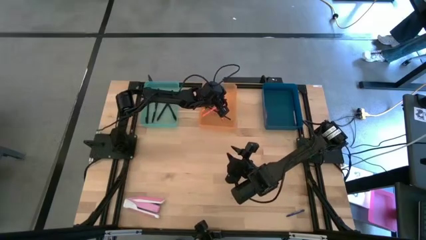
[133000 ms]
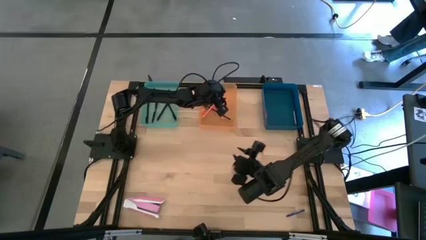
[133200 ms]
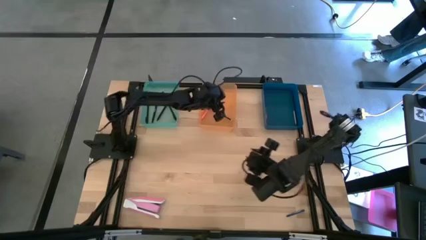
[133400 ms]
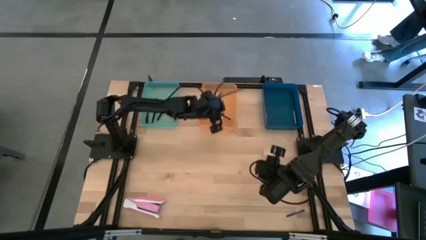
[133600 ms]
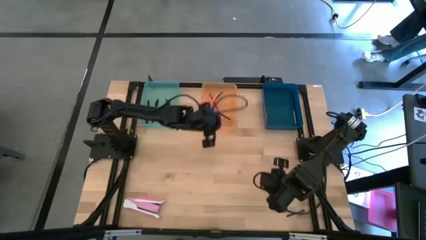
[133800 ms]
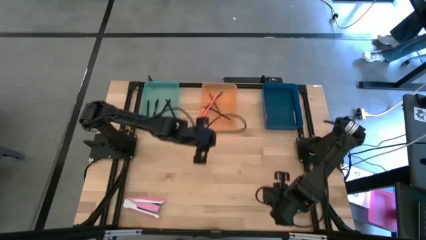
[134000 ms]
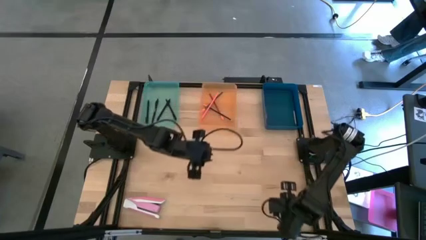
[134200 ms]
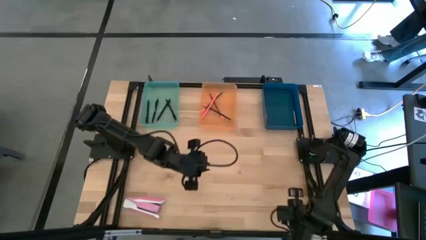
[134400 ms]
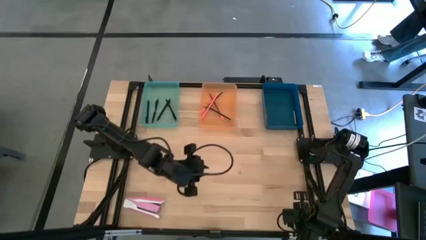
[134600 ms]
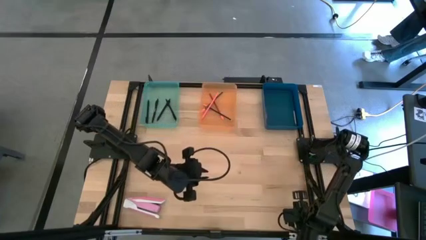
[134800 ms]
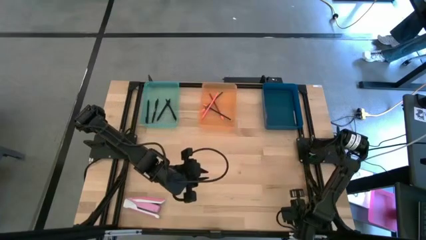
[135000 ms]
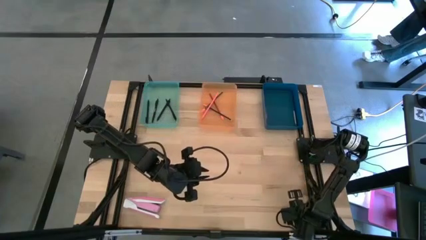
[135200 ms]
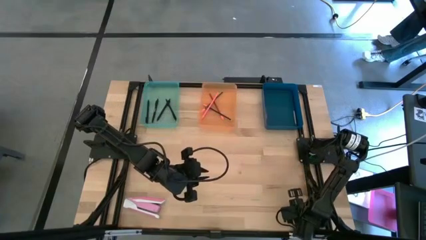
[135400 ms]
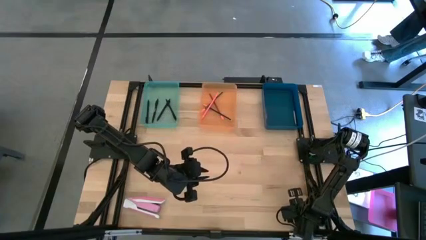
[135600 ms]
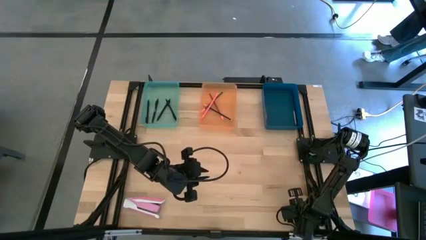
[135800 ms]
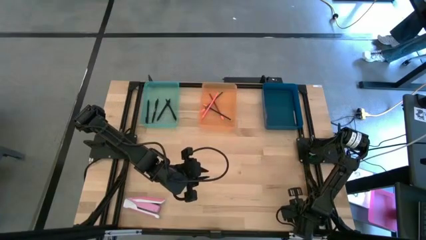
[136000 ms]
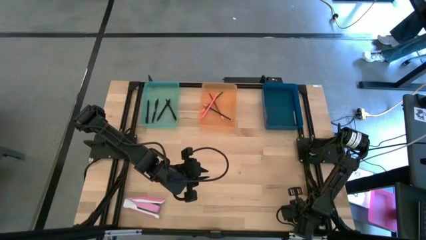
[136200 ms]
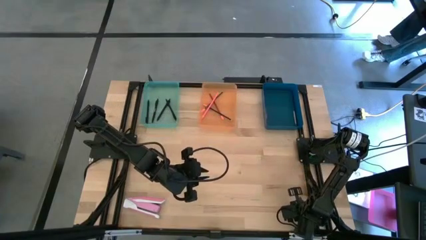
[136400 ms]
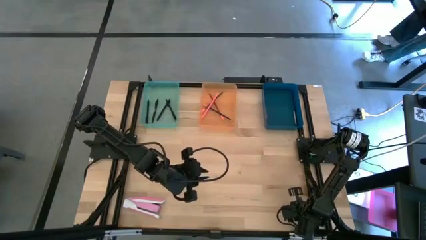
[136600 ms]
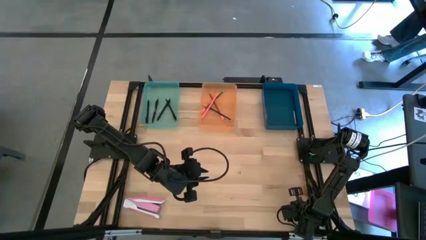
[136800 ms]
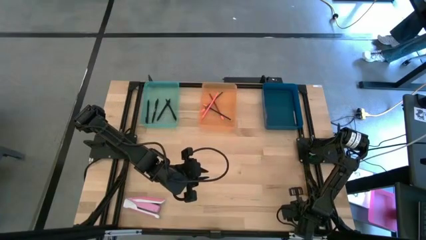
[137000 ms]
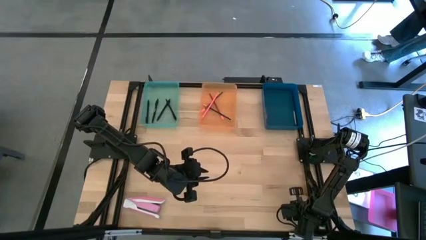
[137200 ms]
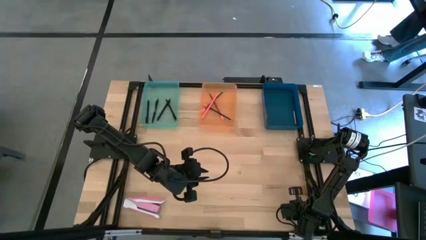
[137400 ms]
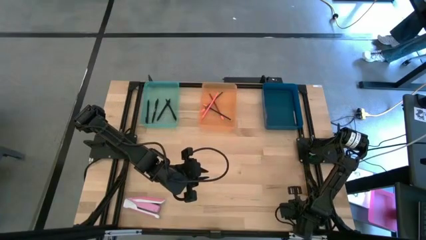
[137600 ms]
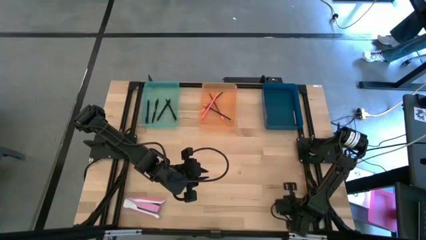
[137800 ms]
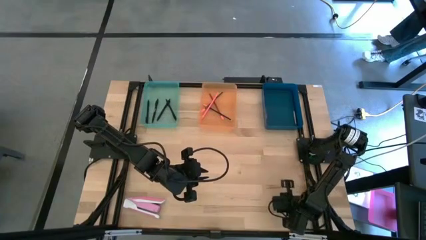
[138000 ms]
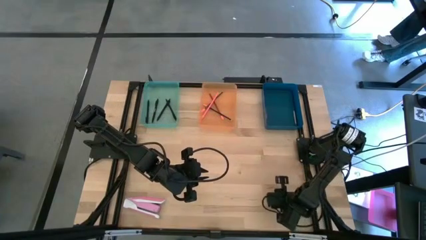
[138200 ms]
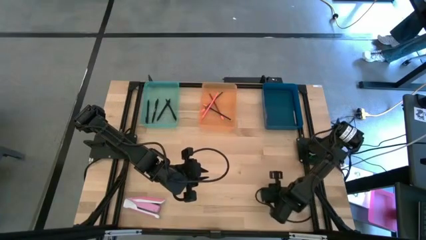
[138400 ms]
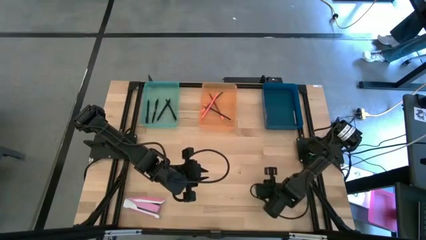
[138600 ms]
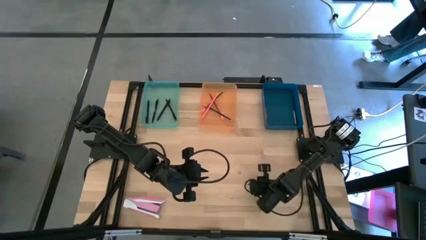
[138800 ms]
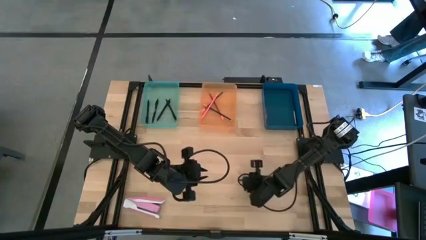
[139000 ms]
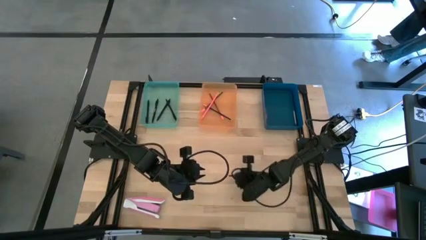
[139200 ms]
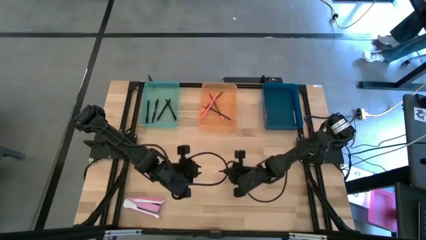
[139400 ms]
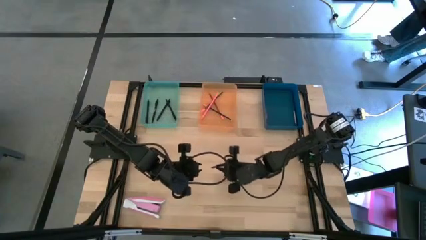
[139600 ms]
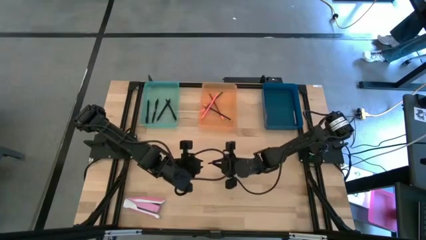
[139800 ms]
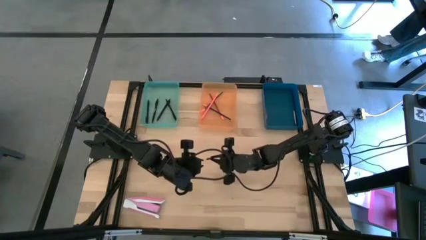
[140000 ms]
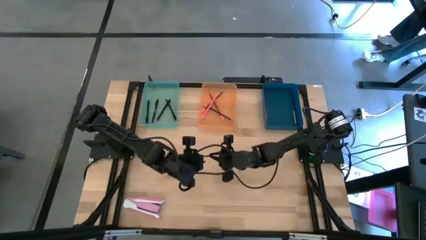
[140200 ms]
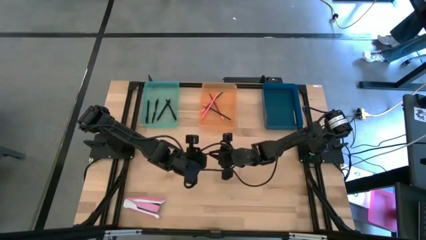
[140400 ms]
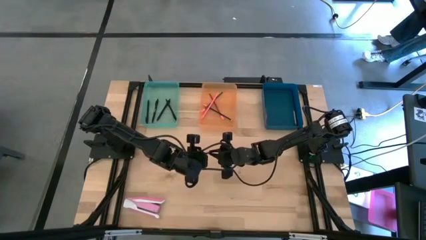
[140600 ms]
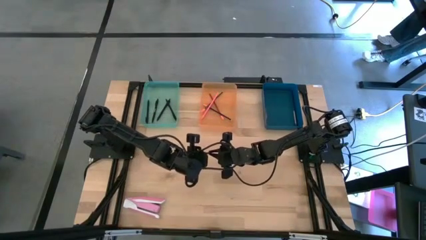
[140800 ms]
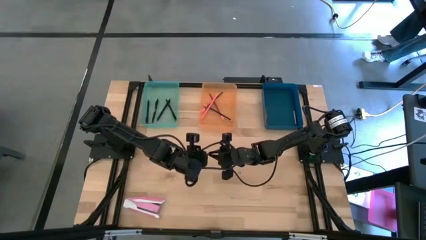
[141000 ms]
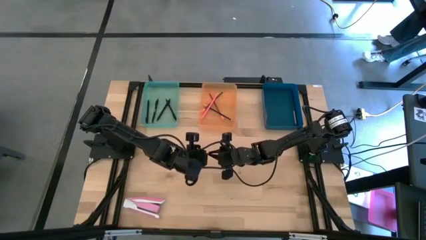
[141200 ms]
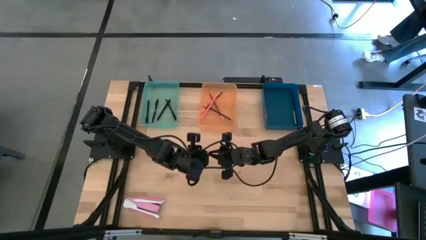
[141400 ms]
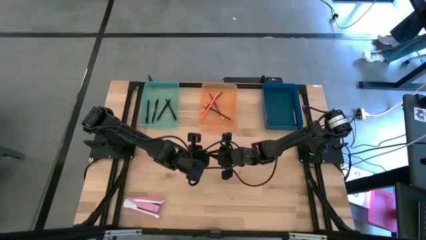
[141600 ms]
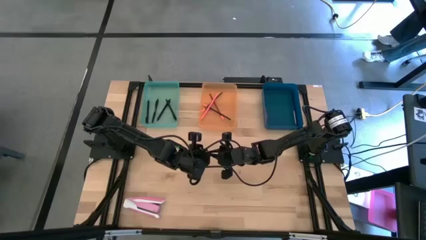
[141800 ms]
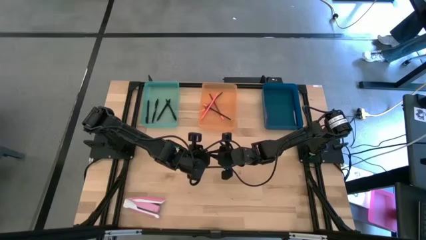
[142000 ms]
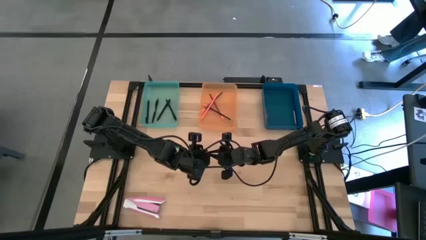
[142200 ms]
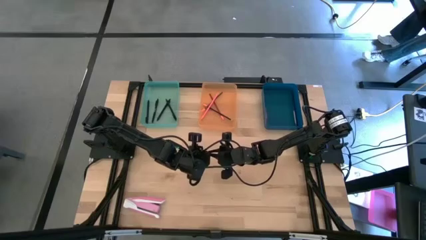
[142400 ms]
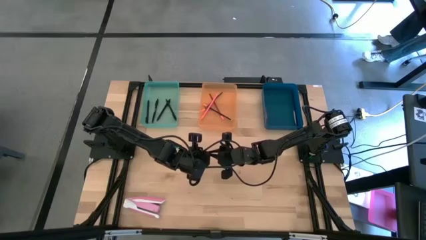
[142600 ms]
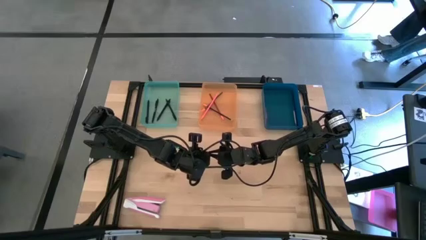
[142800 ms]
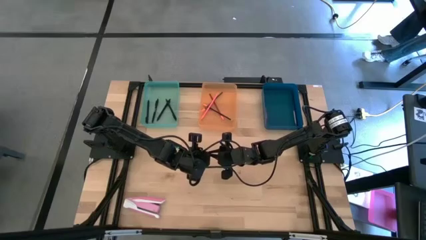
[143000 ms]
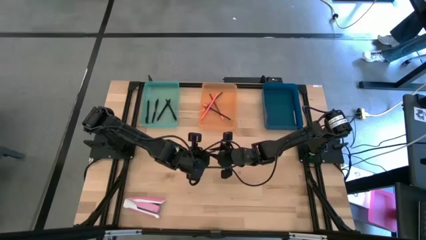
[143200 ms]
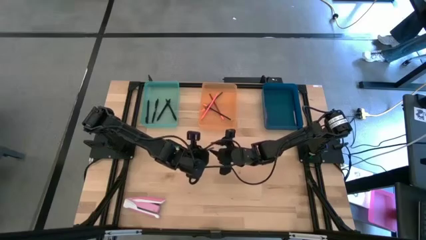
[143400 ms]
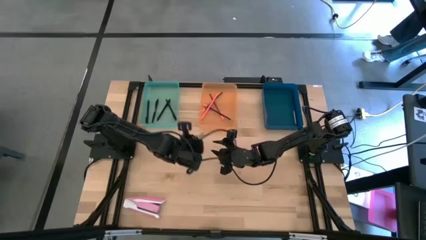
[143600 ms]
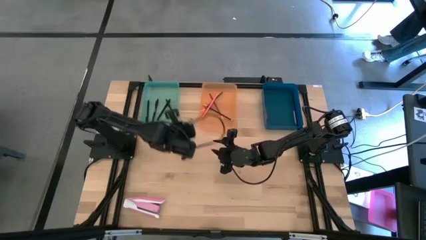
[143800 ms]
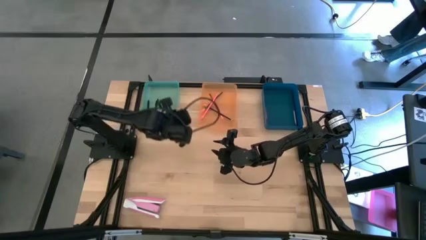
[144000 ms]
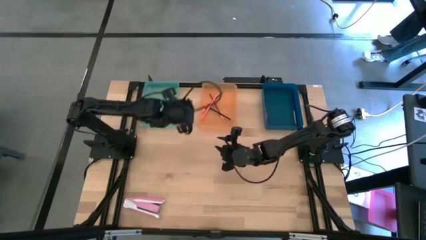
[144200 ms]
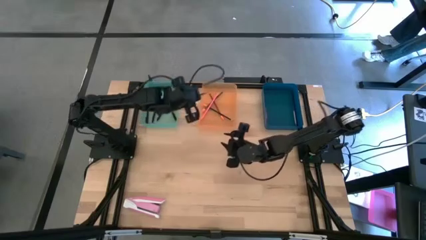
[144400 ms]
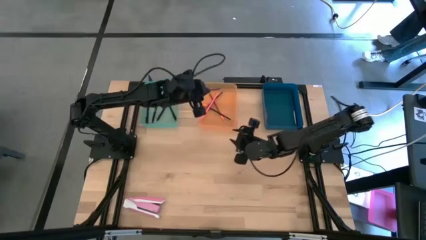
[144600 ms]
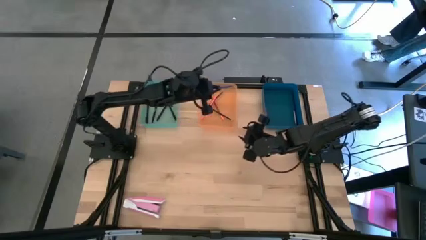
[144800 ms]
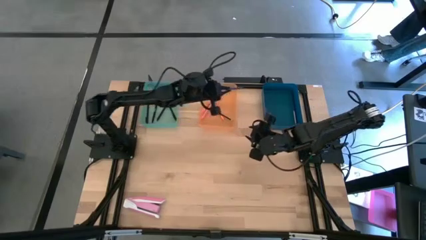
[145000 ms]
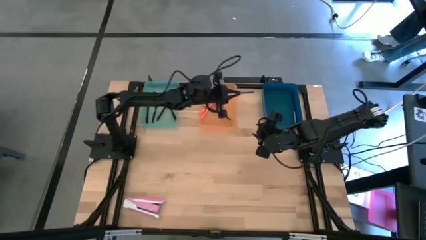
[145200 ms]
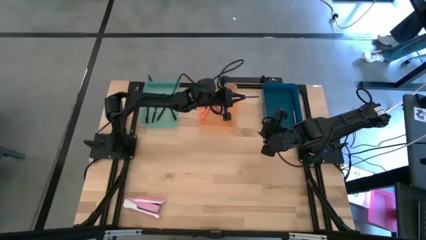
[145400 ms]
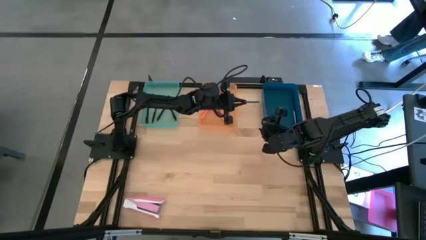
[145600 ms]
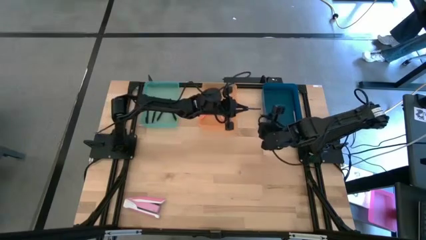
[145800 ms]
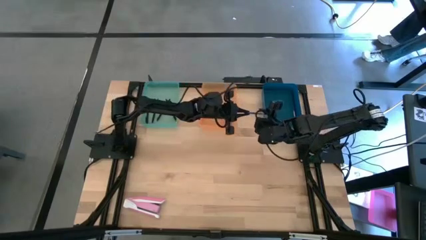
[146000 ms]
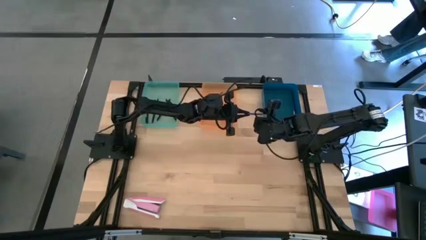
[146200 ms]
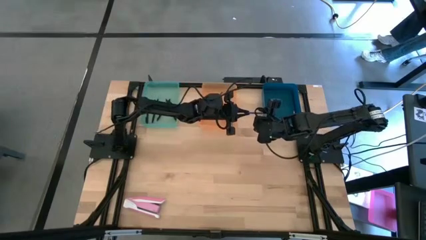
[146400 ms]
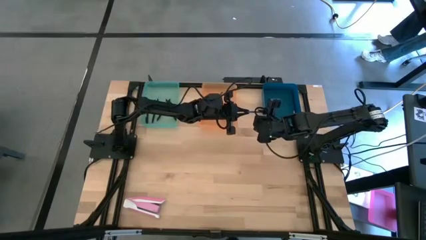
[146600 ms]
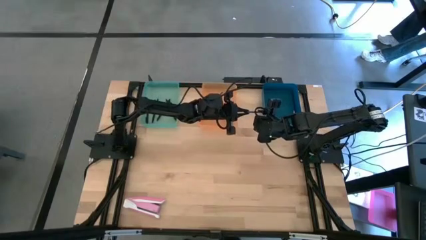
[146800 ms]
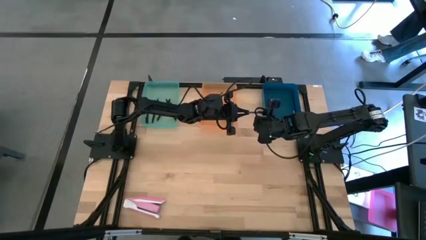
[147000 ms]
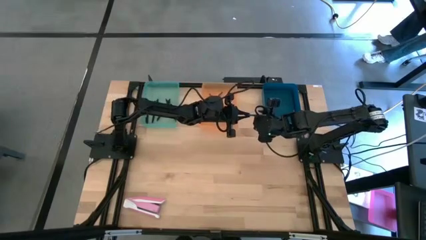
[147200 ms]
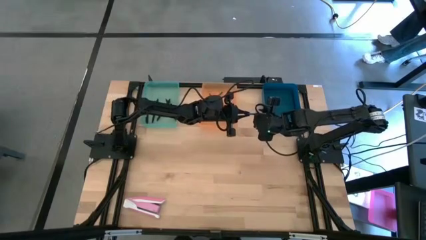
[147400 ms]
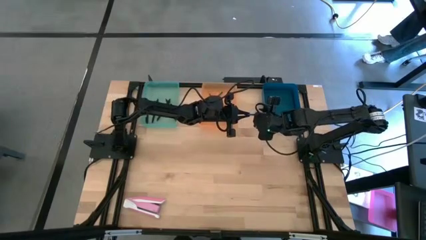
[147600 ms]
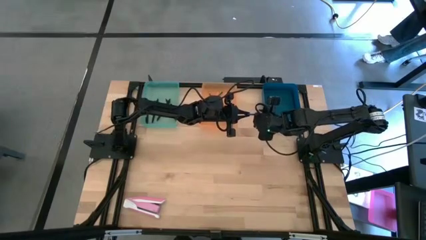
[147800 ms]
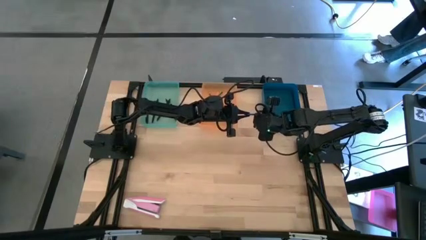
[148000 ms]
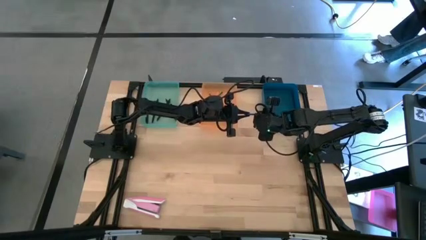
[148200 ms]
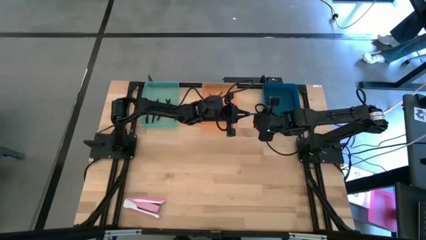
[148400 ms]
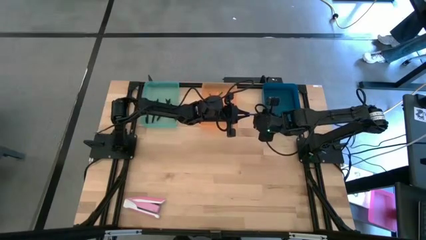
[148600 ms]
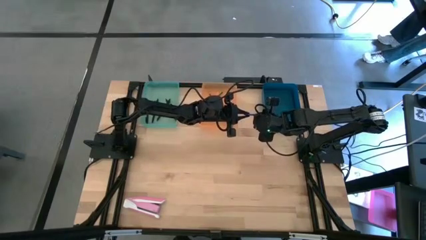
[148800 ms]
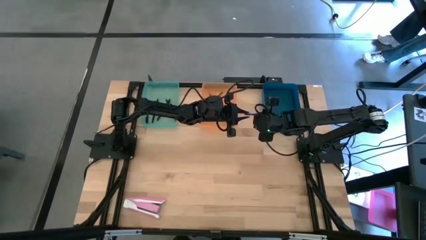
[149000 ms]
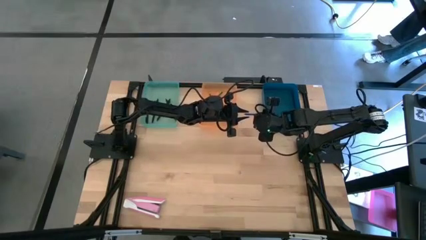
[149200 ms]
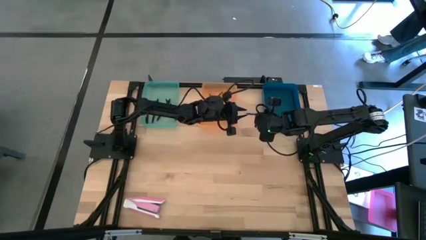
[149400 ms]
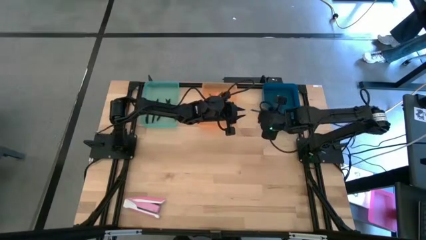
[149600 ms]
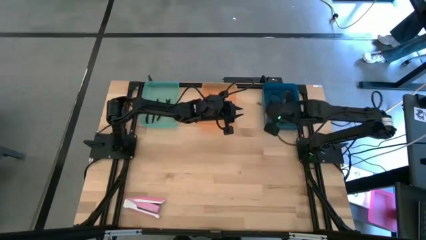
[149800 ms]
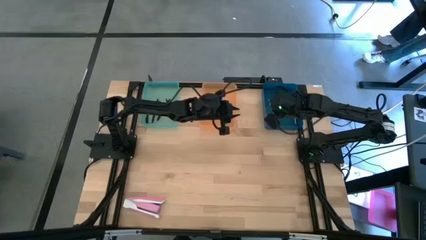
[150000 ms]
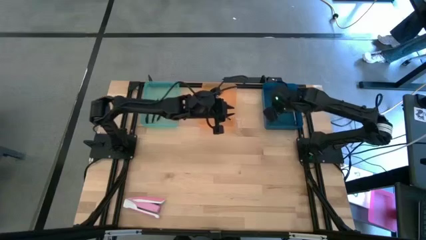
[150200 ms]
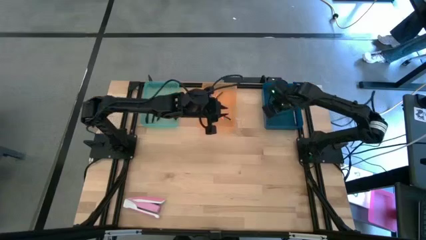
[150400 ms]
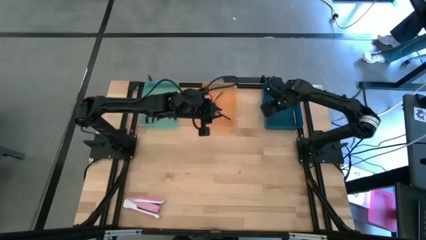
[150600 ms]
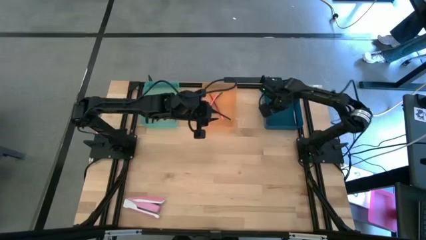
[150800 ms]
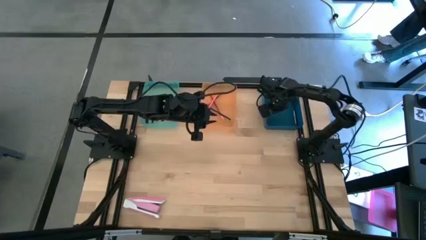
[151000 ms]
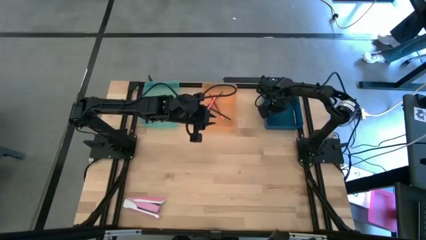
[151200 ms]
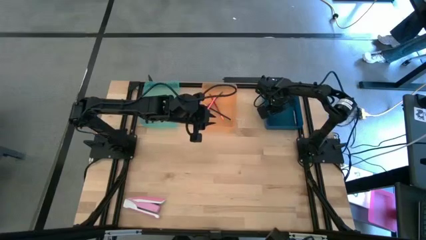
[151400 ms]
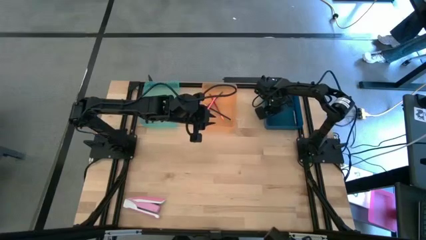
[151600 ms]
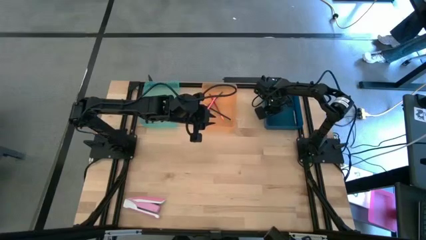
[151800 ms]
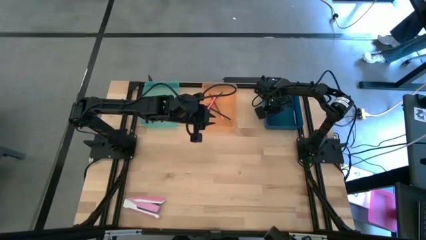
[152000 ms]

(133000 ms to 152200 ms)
Task: Sort crayons/erasers/pens/pencils in bins
Put the blue crayon into the blue bin
